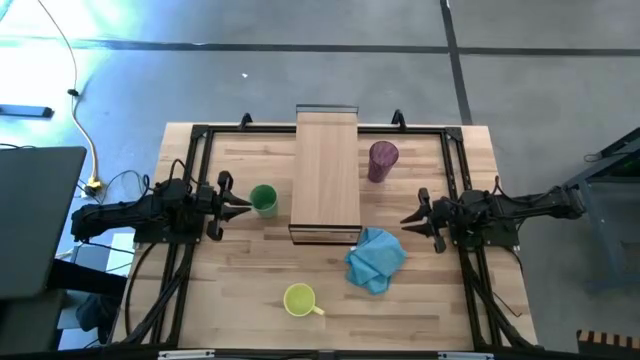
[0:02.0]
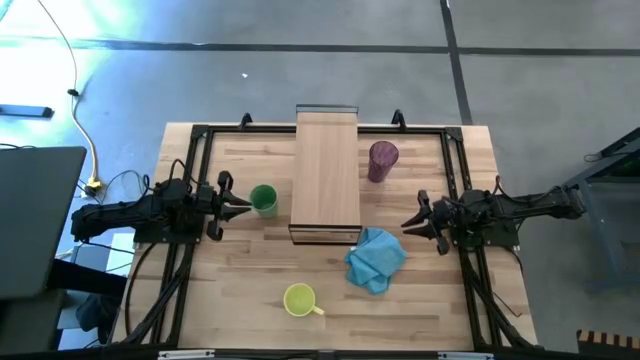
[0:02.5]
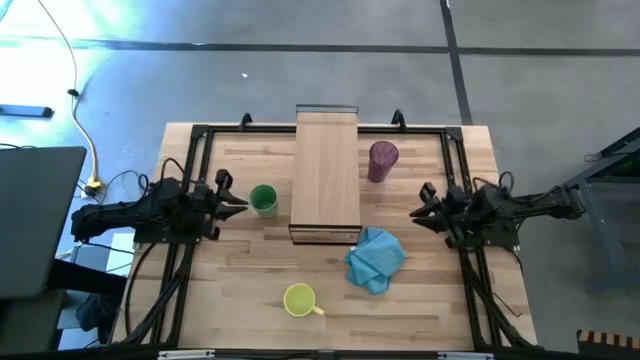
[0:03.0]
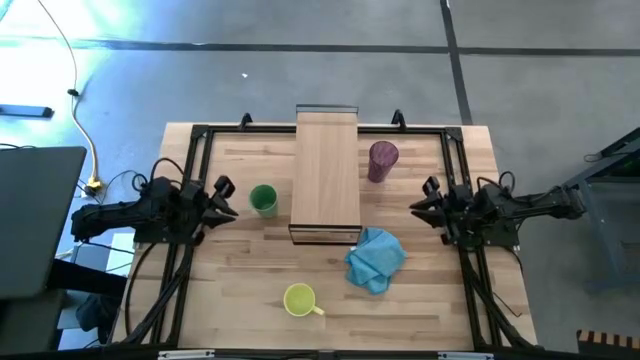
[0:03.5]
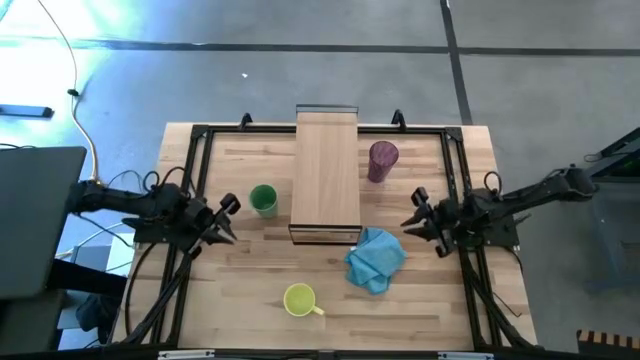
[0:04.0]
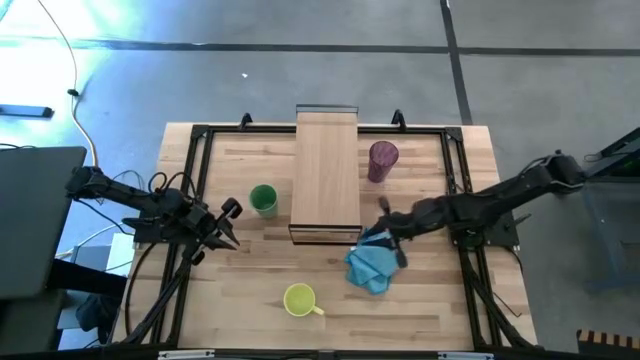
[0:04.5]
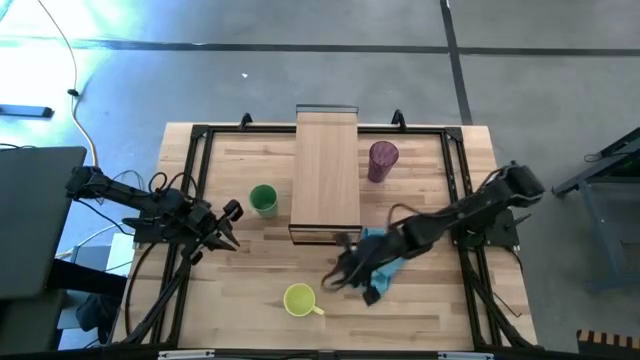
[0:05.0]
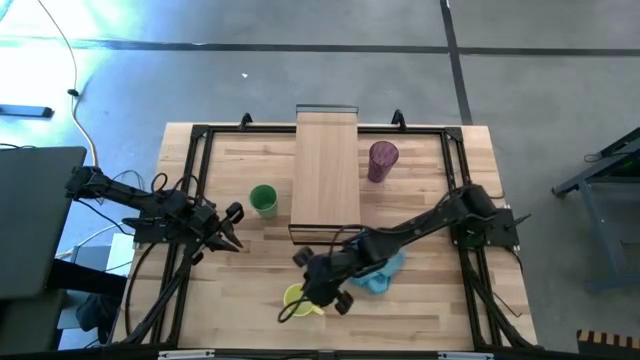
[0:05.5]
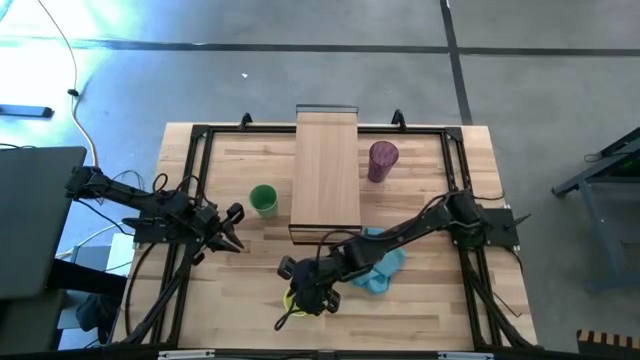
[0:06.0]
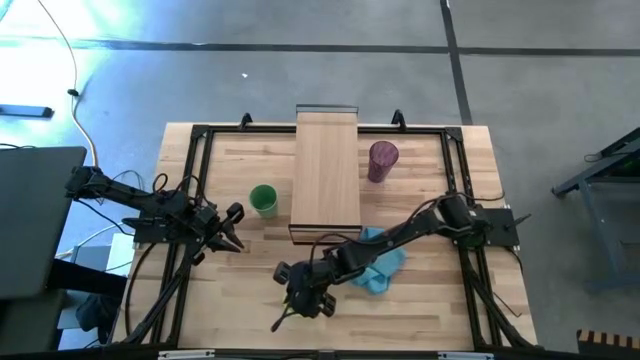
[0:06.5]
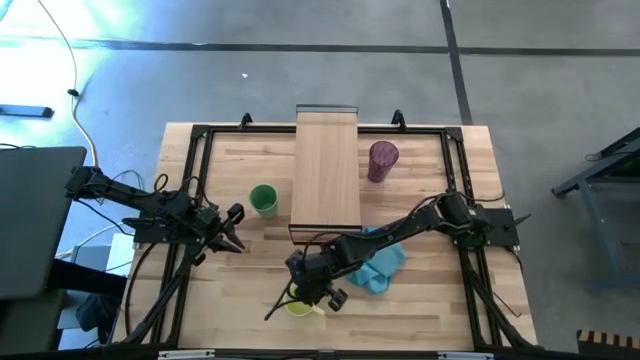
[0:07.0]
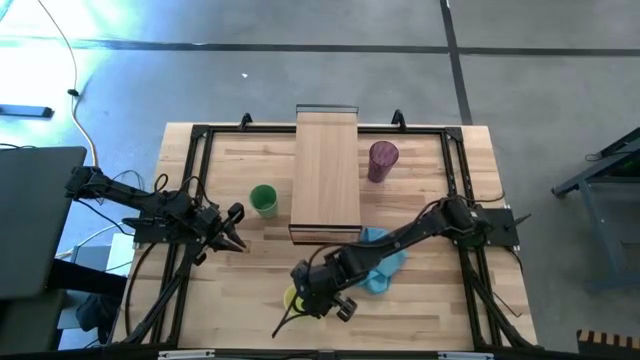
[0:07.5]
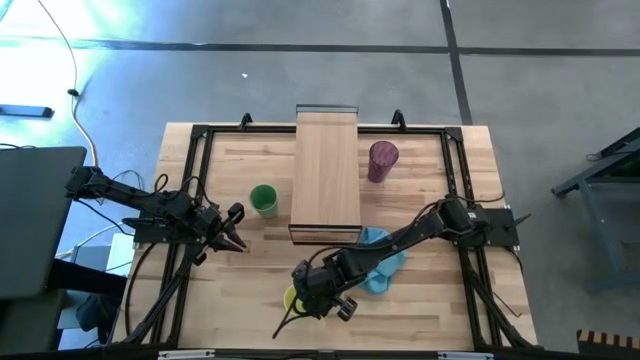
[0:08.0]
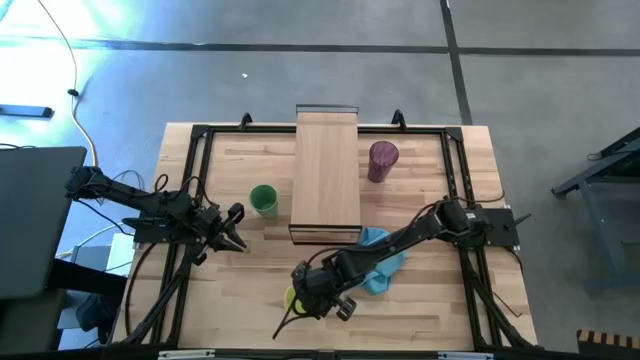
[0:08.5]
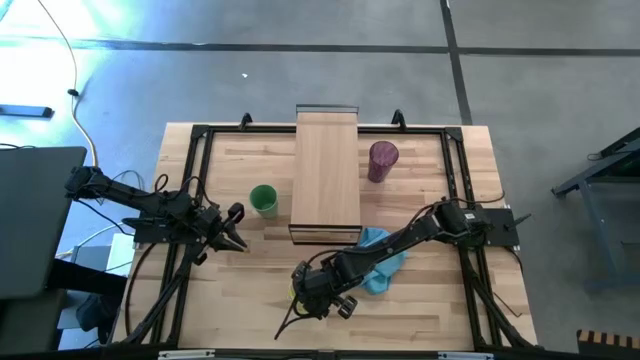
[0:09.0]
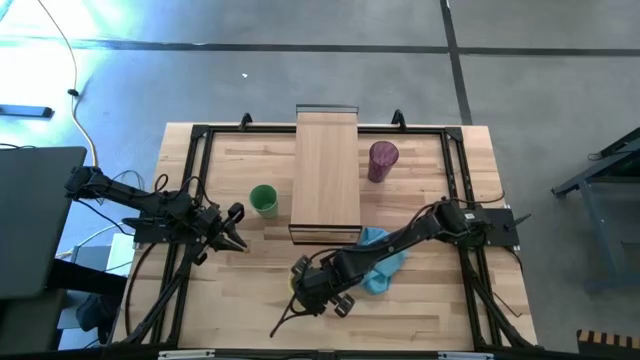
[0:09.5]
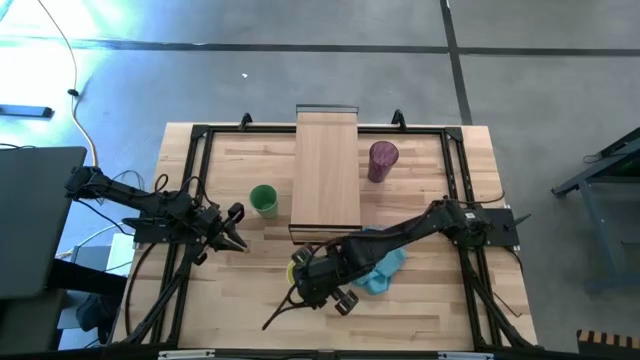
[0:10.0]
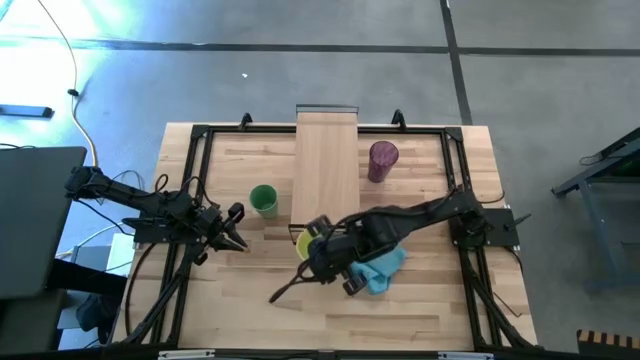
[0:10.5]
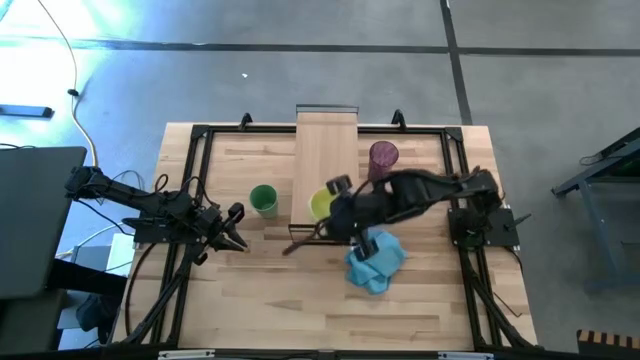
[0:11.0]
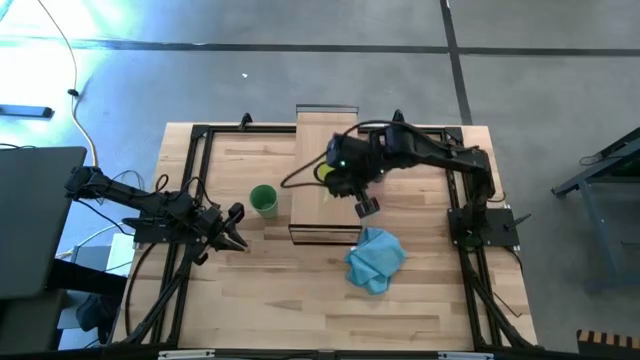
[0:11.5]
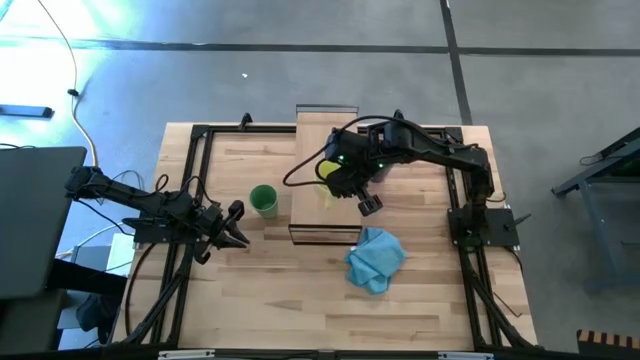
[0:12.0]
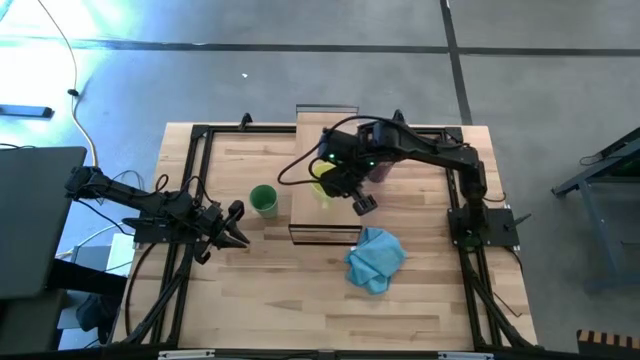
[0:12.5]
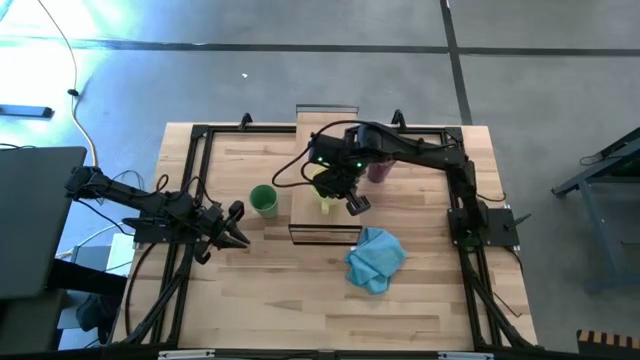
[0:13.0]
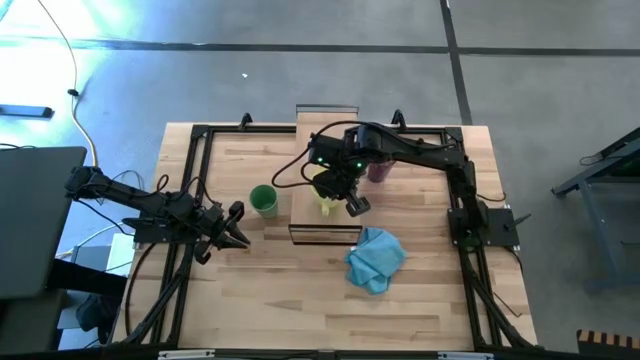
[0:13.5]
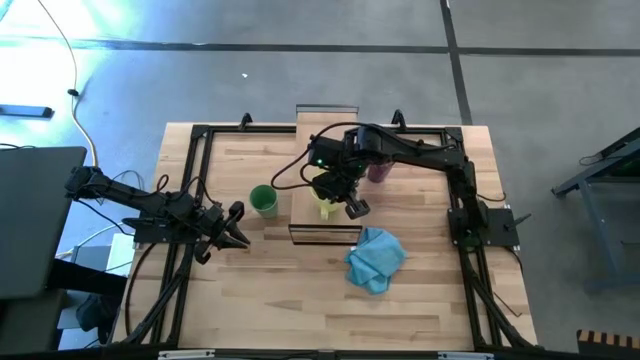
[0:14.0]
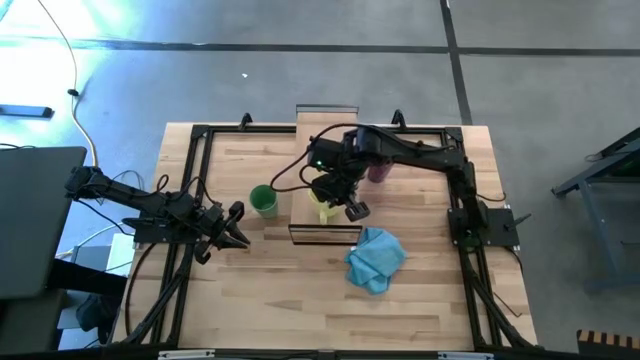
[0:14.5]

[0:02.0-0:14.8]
Task: Stack small to large cups/mugs on shelf
Put the yellow mug on the shelf

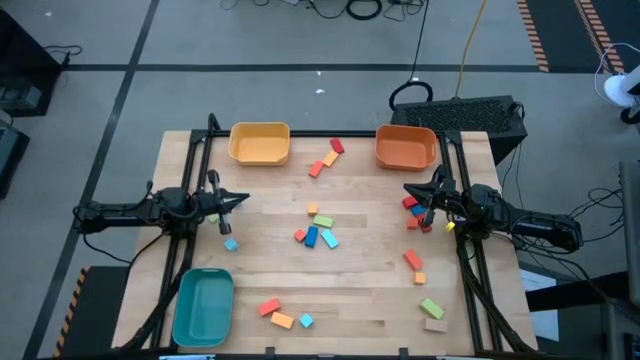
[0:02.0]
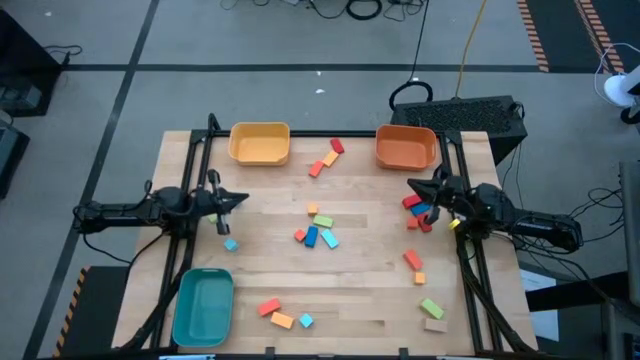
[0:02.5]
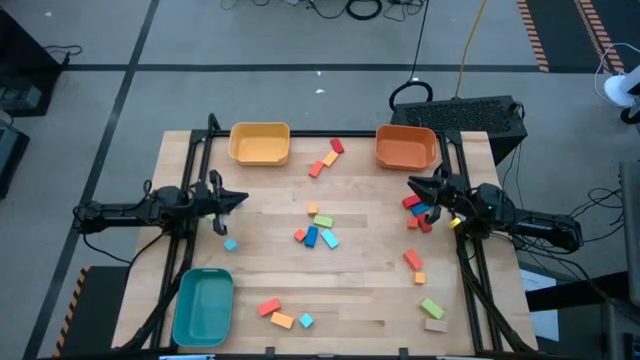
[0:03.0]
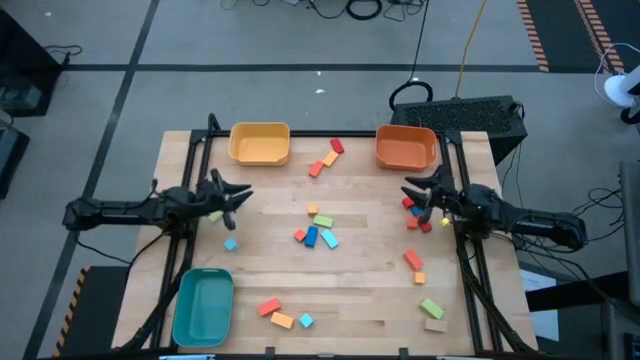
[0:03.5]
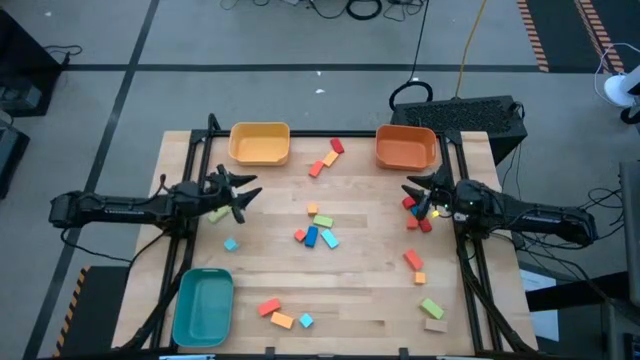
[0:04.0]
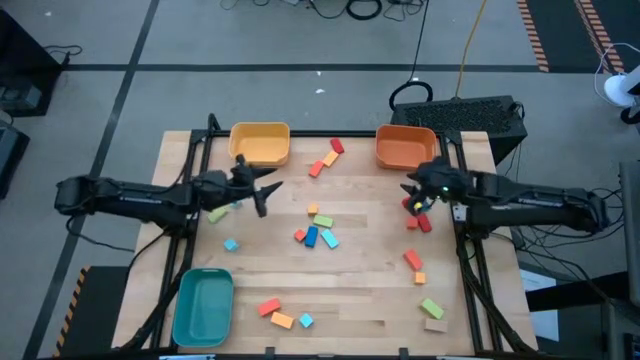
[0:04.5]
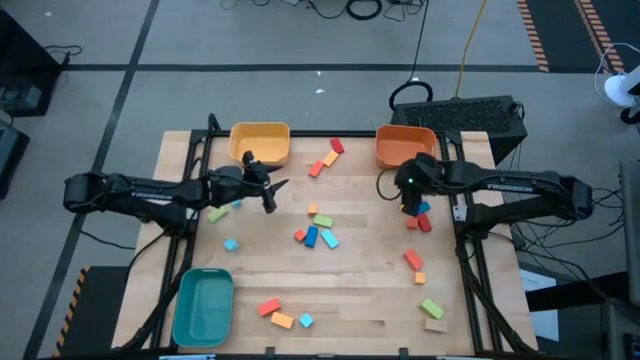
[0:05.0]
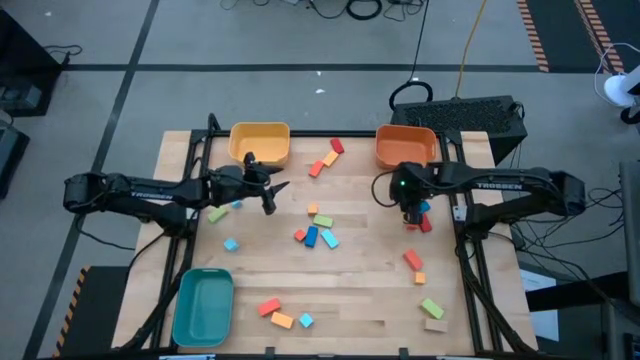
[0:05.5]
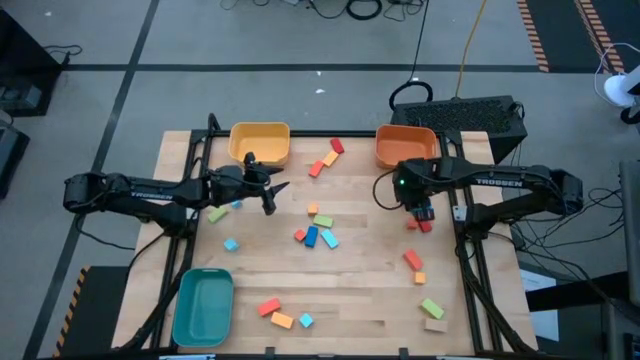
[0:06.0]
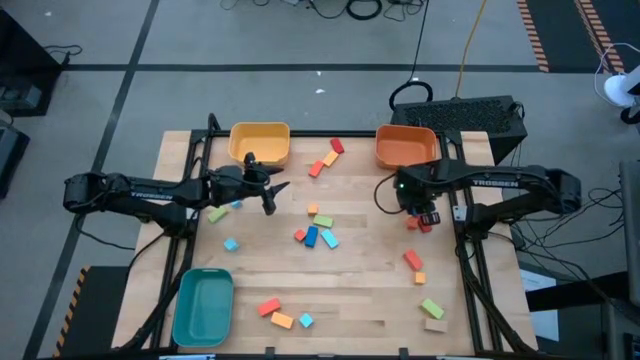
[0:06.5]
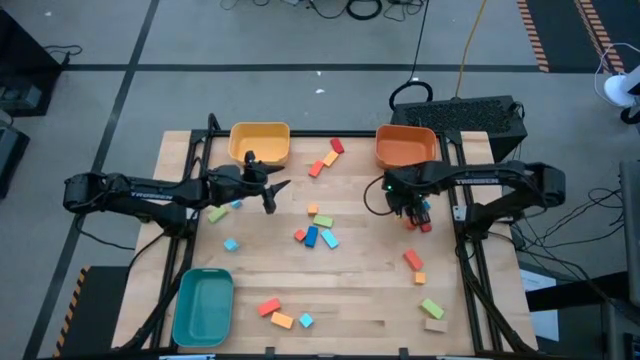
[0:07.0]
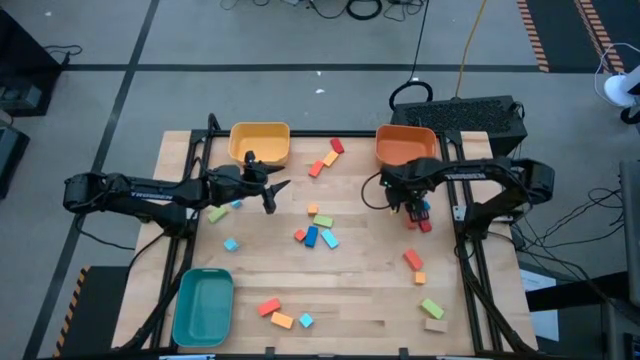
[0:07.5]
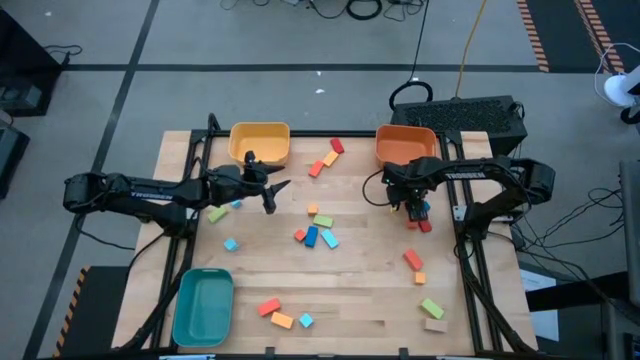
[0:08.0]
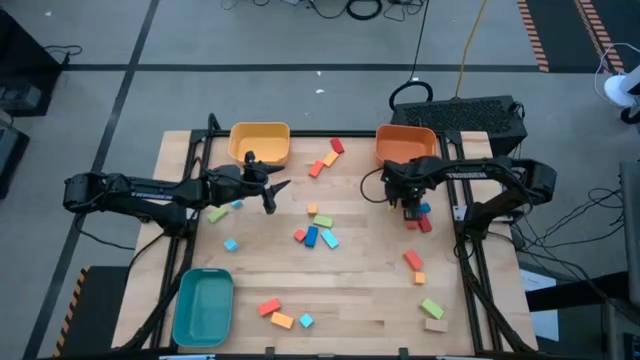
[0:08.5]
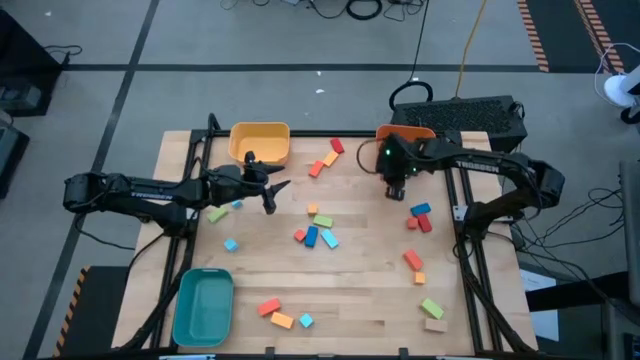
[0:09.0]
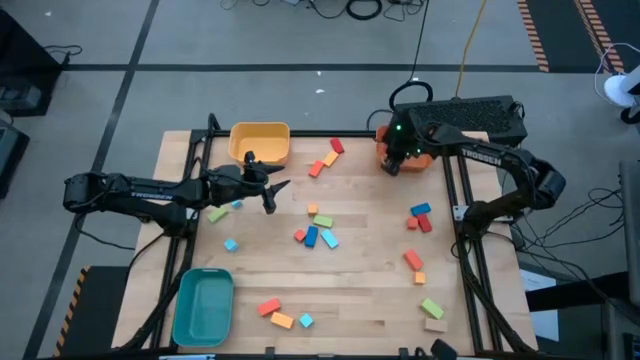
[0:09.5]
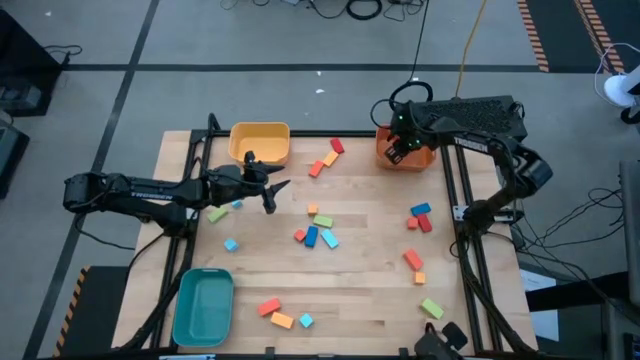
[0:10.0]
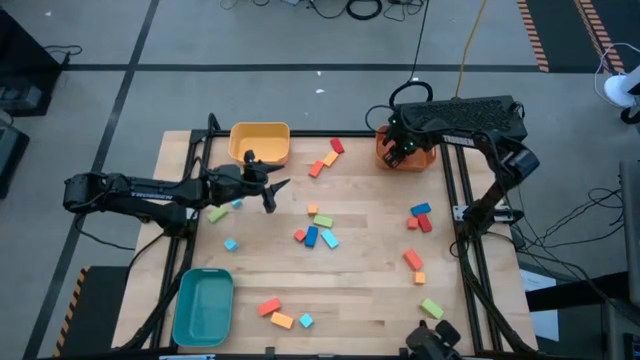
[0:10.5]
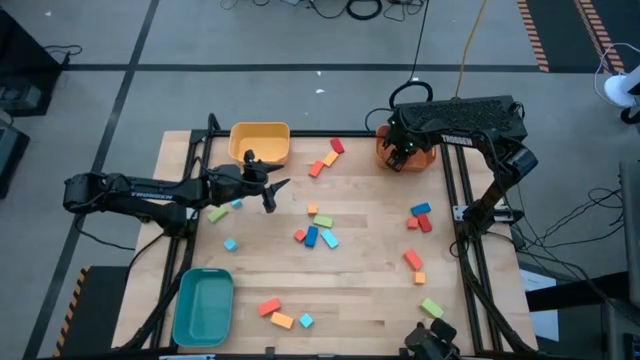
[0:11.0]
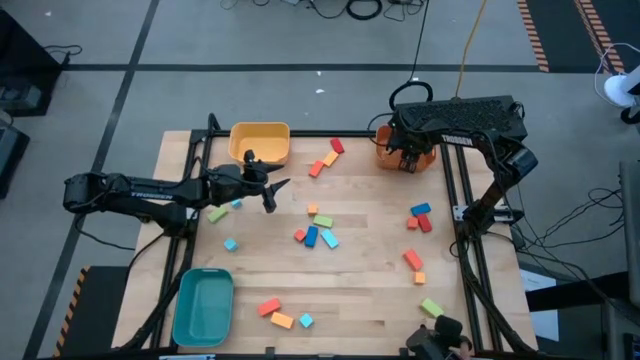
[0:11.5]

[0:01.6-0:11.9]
Task: Sort blocks by size
Put the large red block into the orange bin
